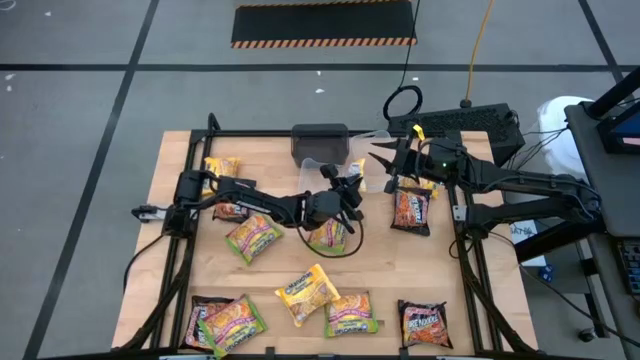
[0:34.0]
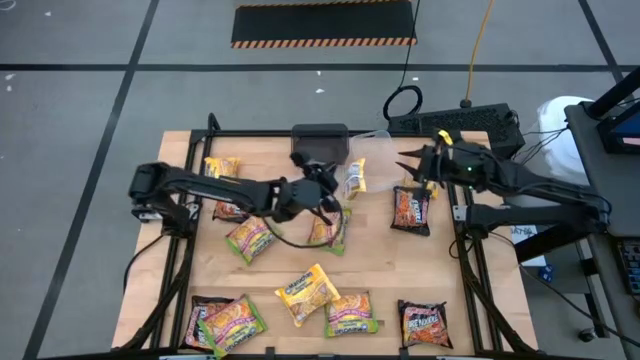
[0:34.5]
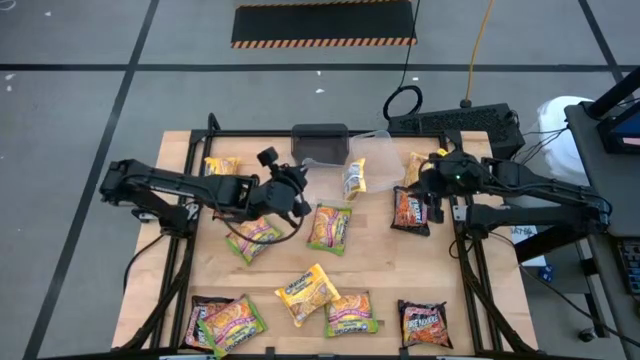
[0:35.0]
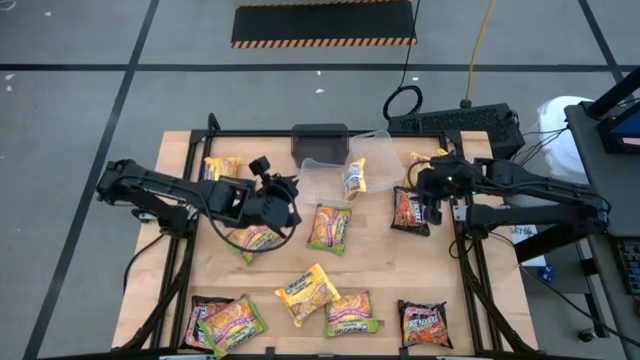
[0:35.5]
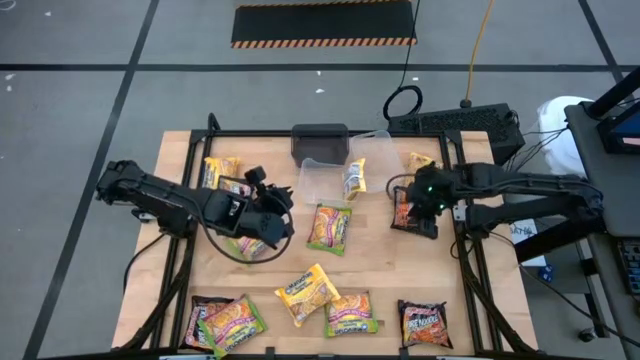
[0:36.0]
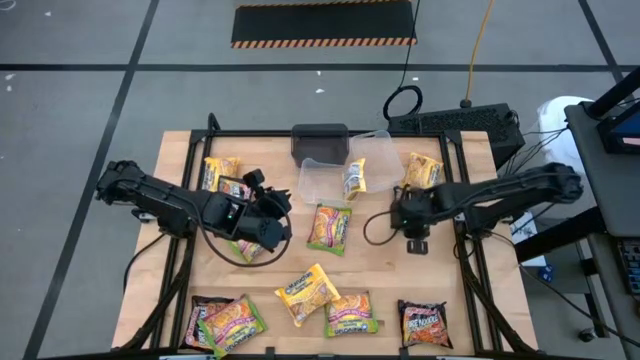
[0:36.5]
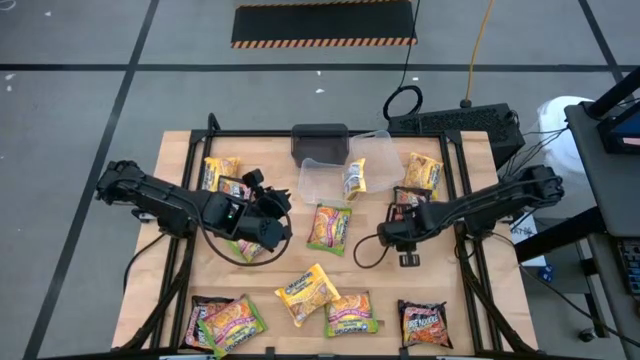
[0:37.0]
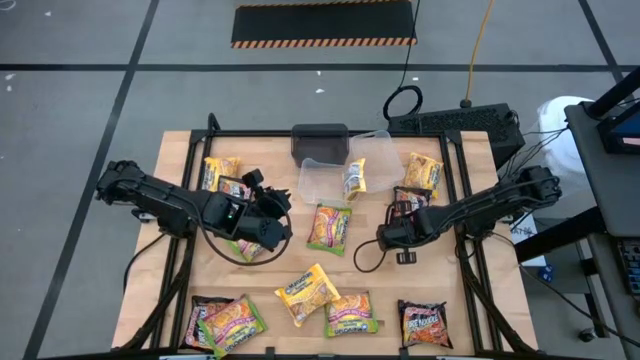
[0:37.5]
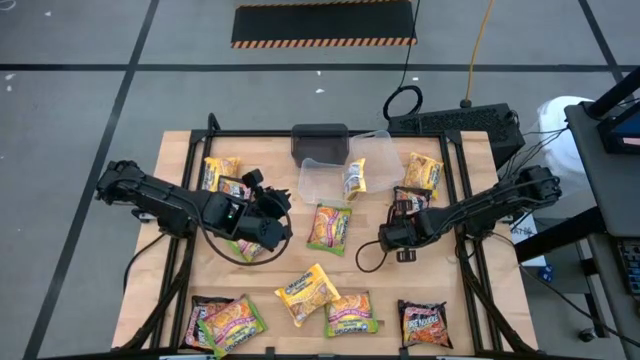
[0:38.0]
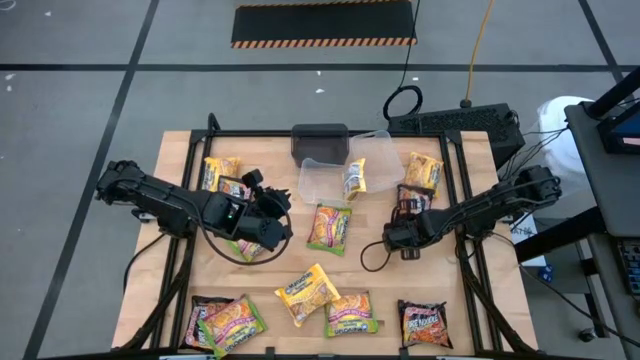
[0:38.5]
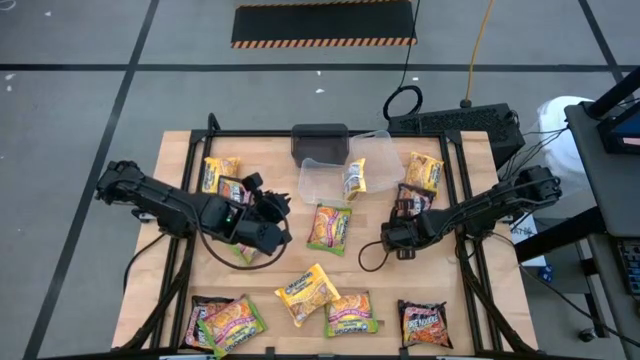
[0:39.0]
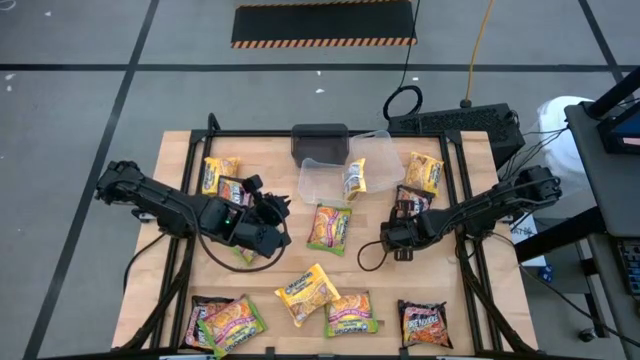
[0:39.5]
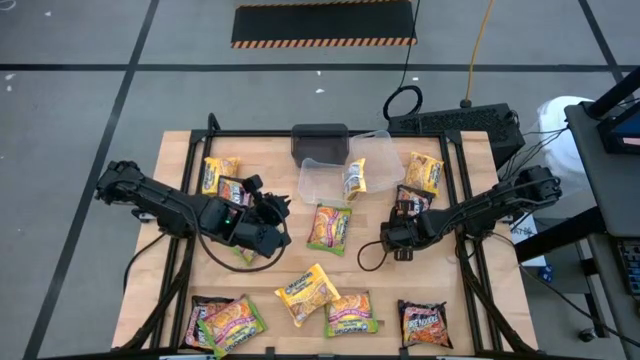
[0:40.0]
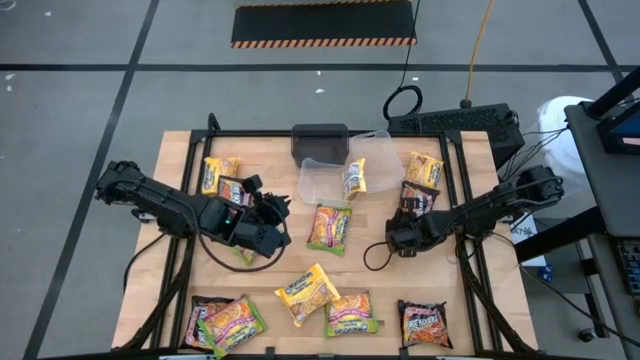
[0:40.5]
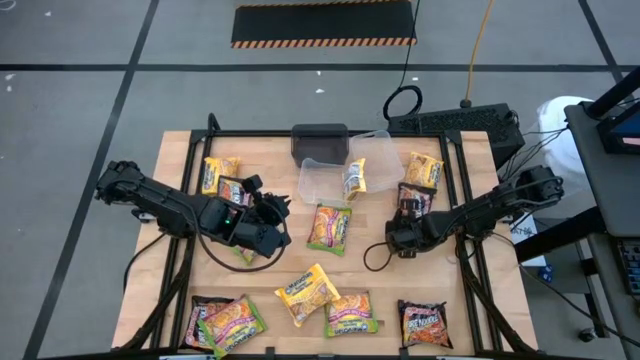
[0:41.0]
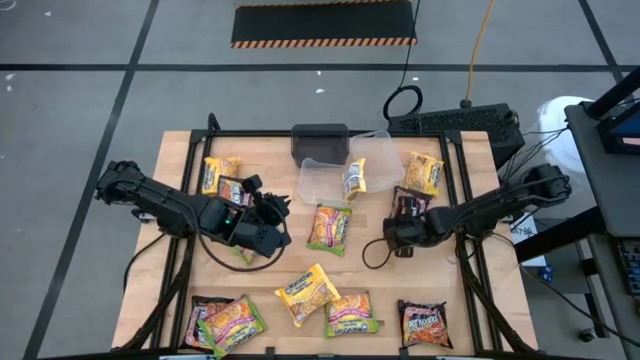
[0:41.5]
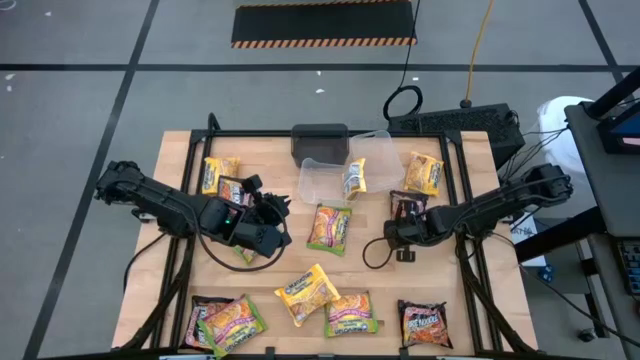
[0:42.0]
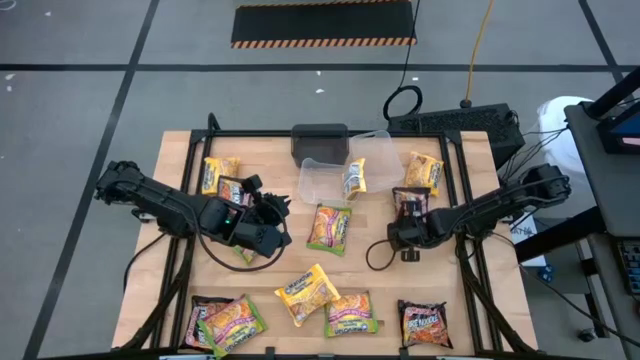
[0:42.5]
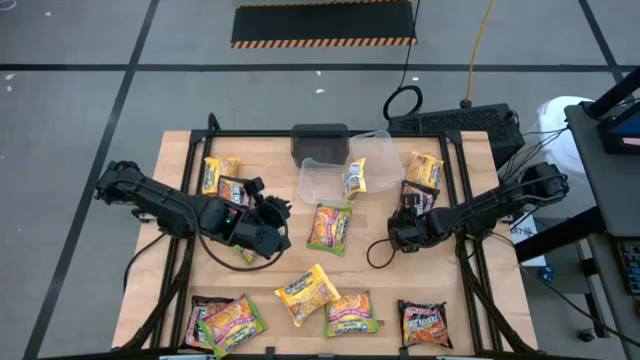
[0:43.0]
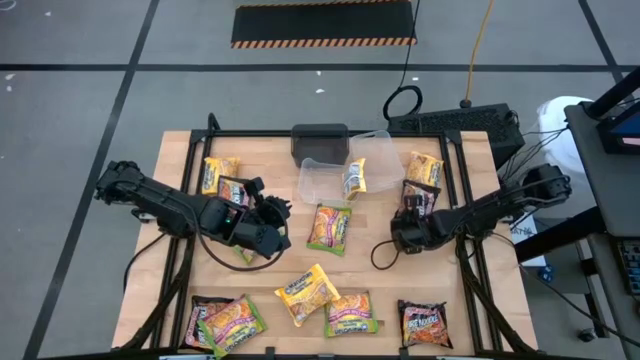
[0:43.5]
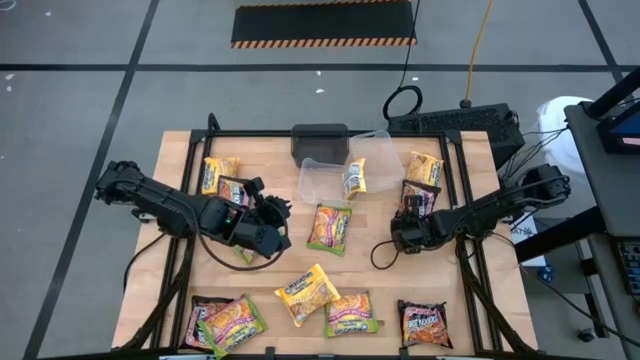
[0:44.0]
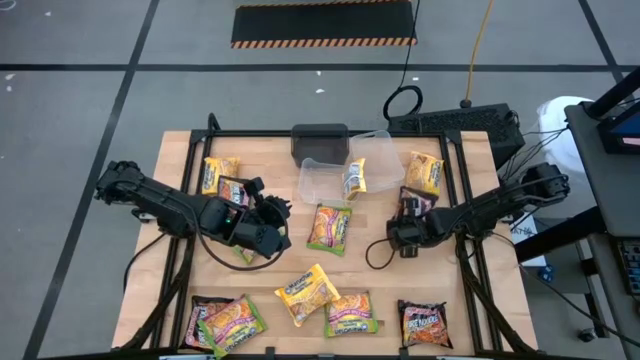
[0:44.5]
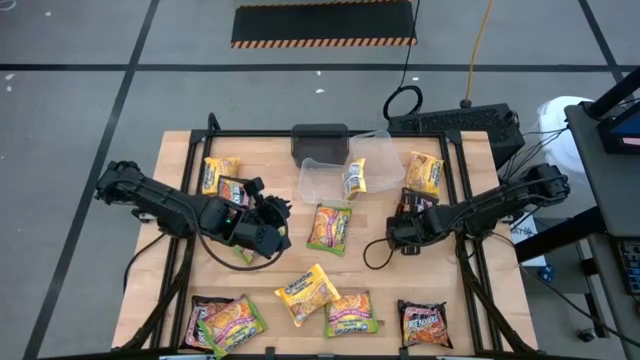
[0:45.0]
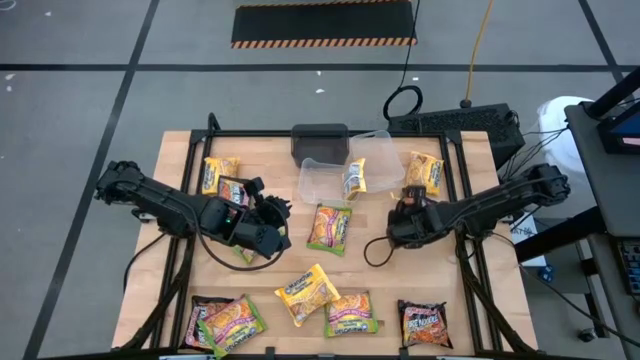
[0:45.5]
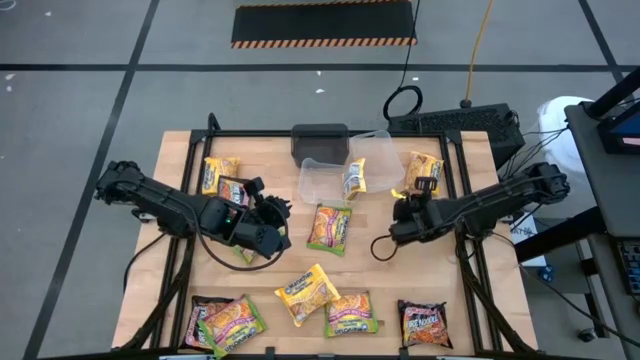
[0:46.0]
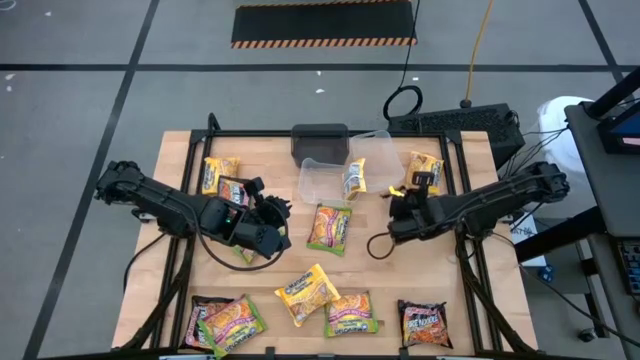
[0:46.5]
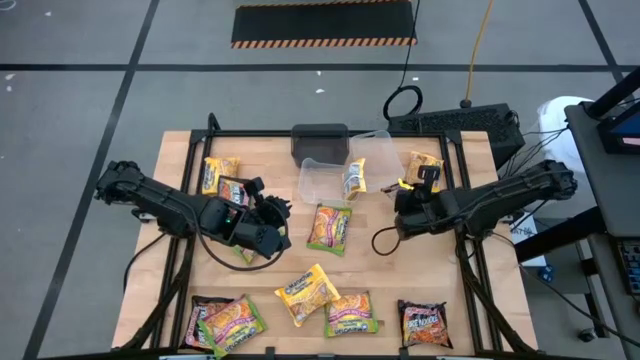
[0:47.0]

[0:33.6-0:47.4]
Task: Sort Maruchan noodles
Put the black noodle pack into the right transparent bin
